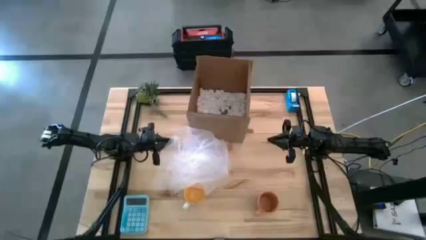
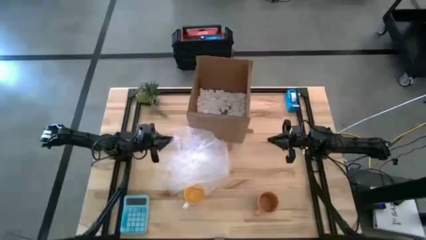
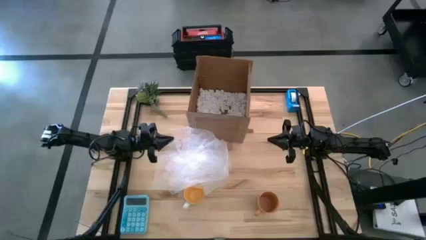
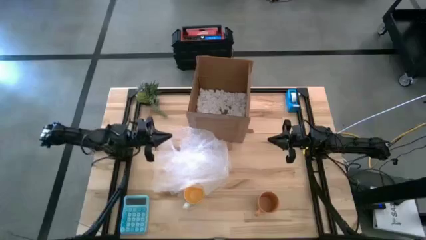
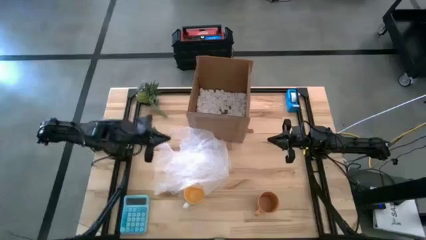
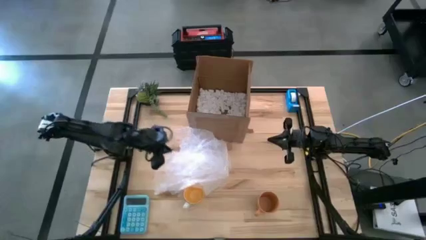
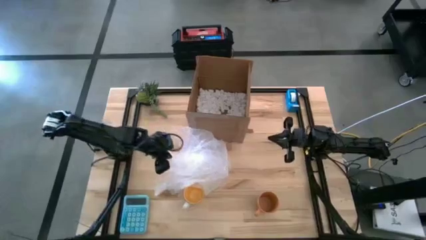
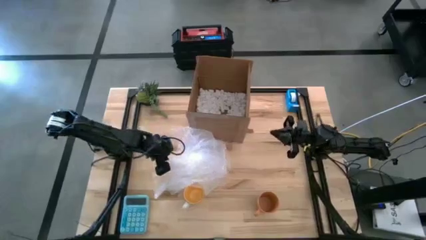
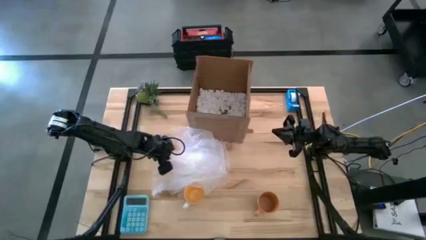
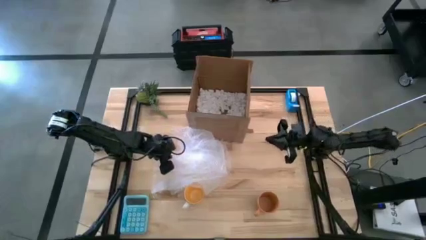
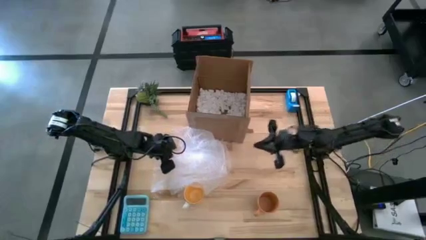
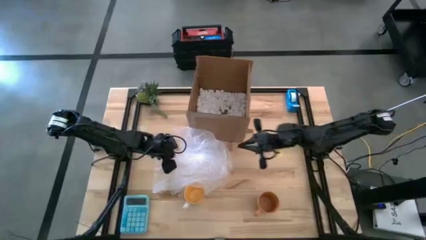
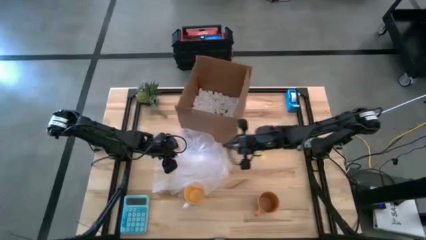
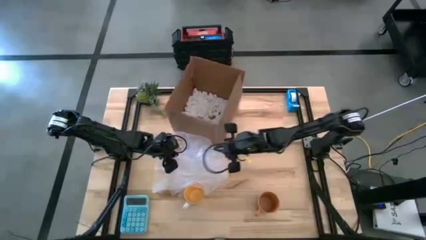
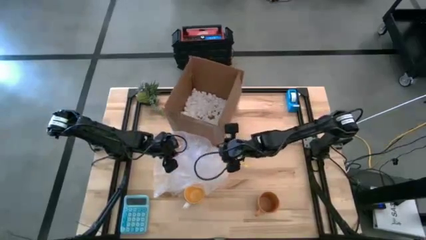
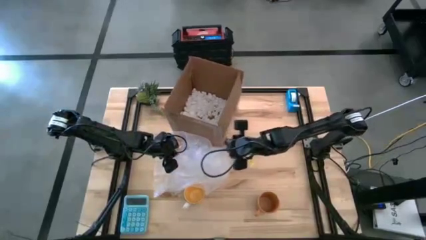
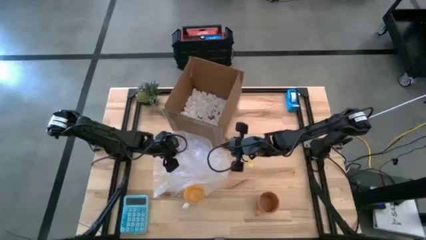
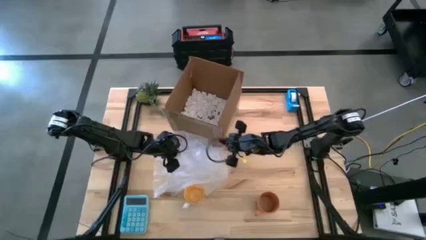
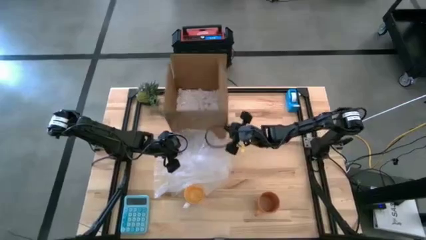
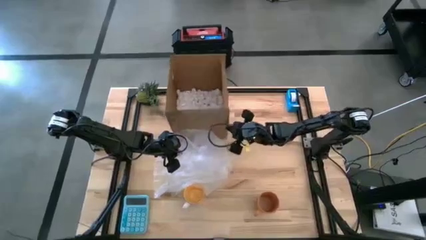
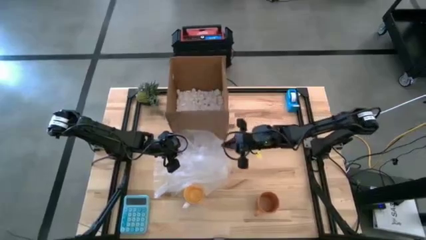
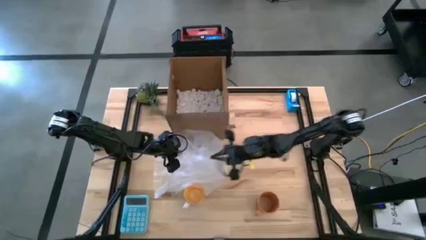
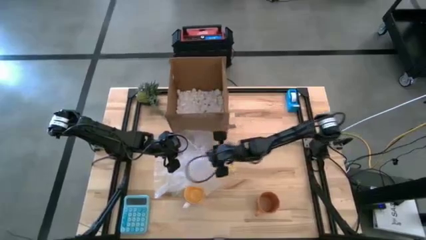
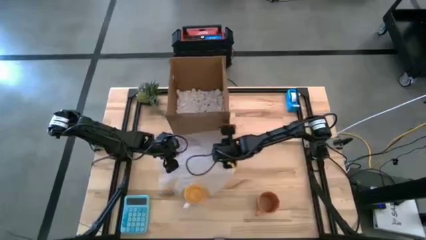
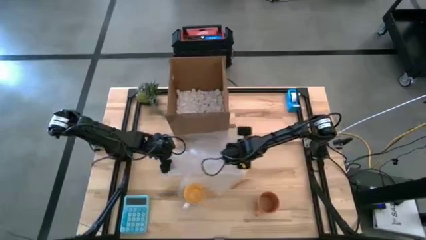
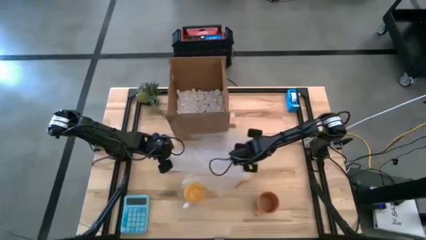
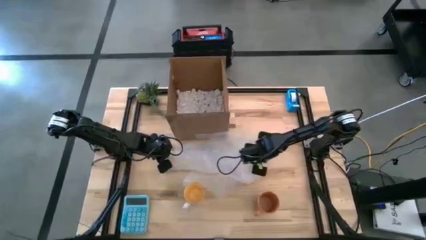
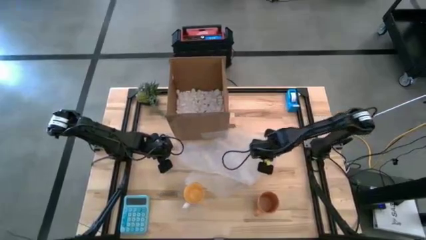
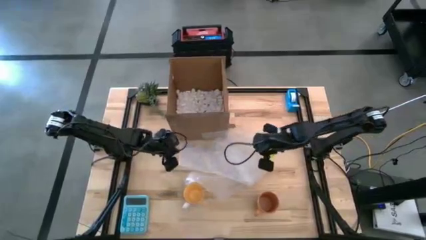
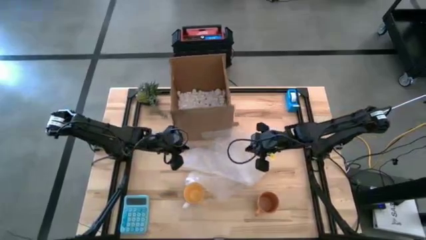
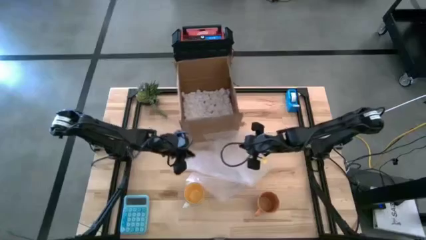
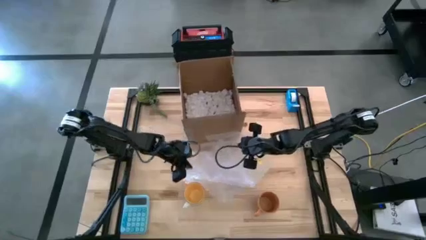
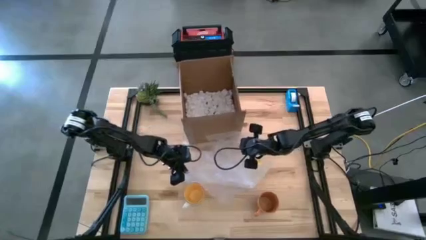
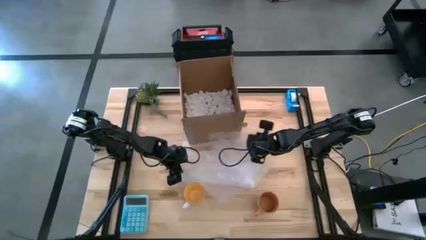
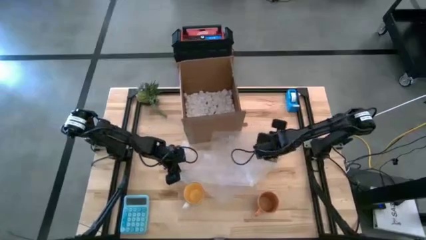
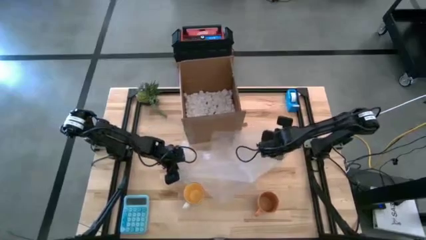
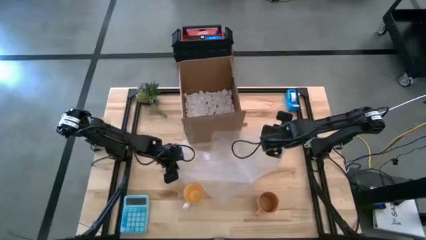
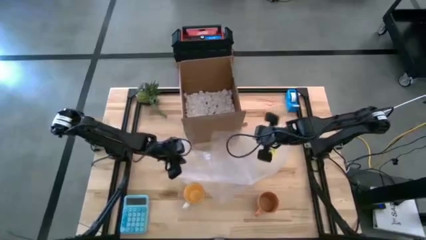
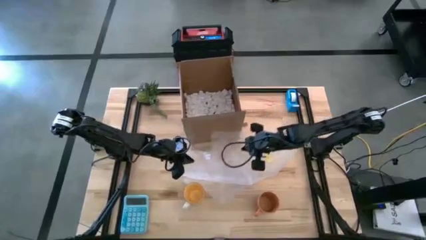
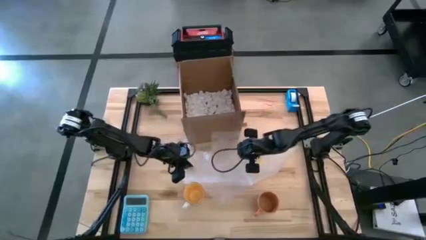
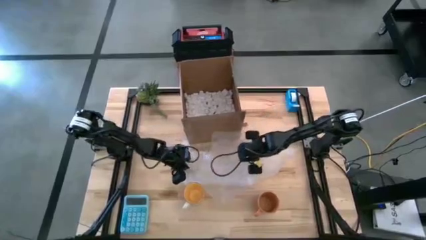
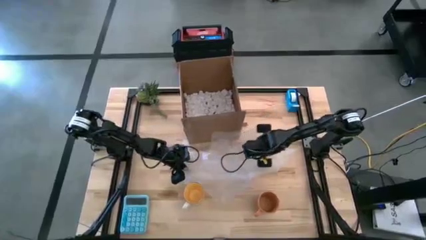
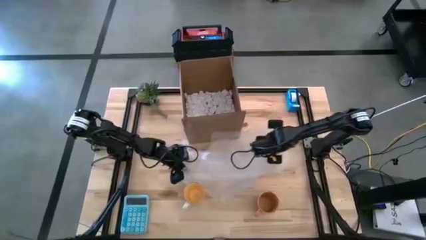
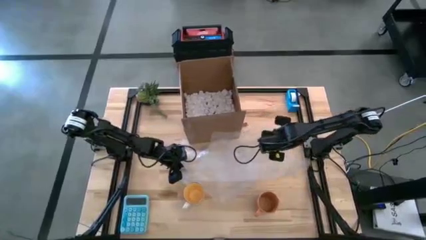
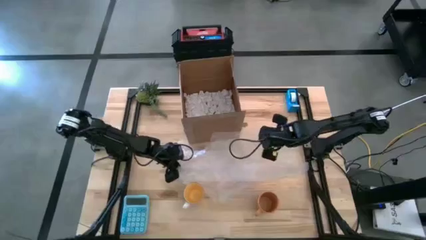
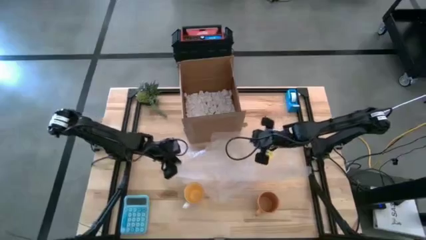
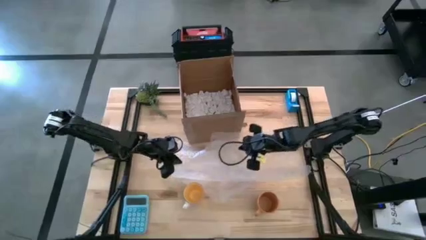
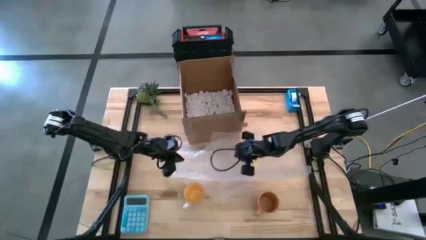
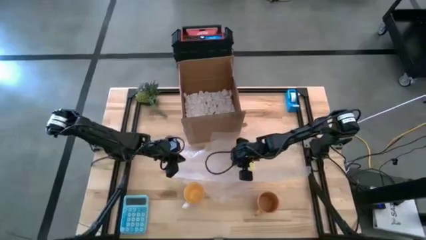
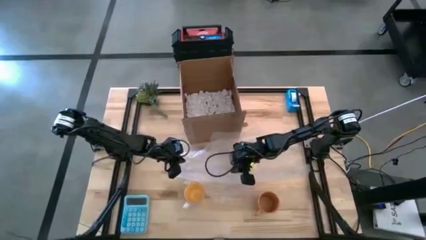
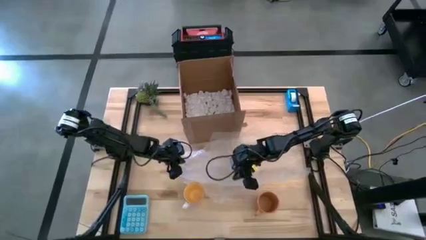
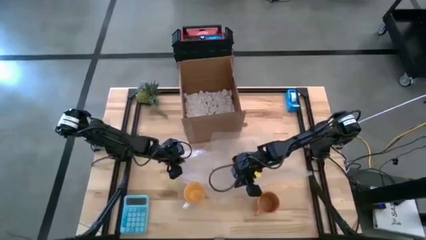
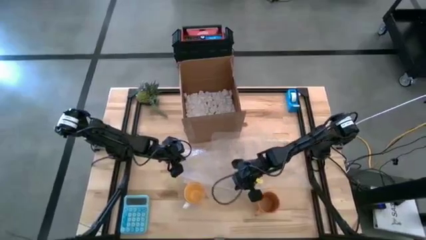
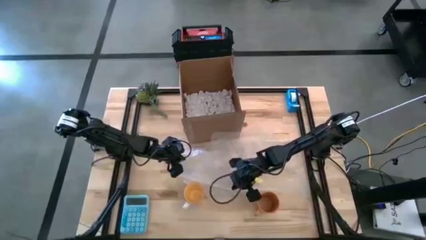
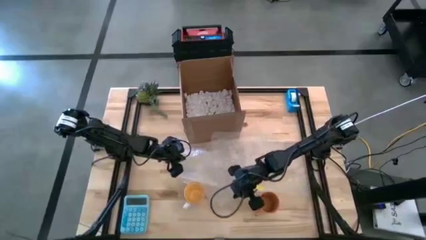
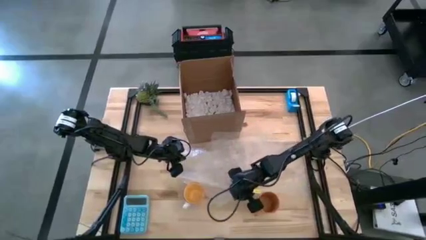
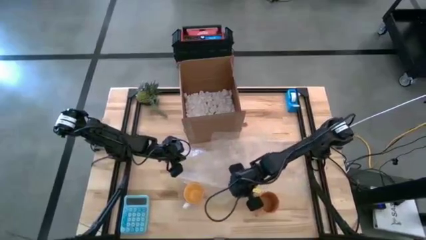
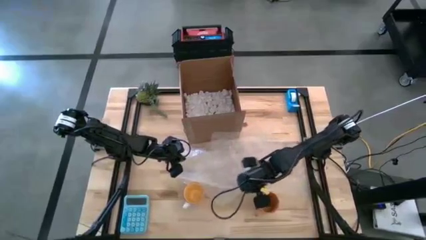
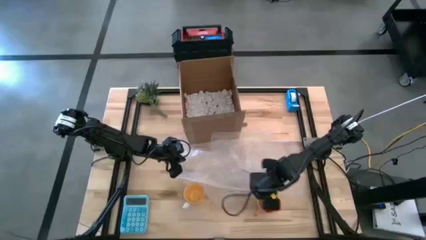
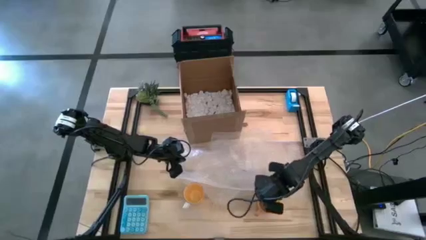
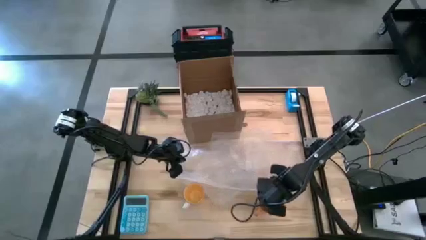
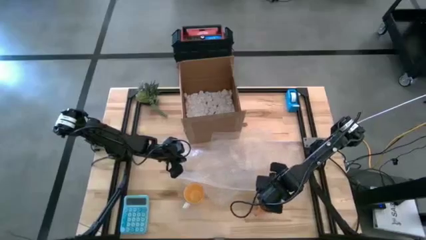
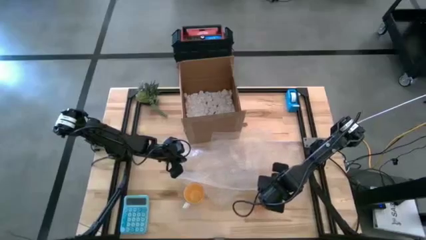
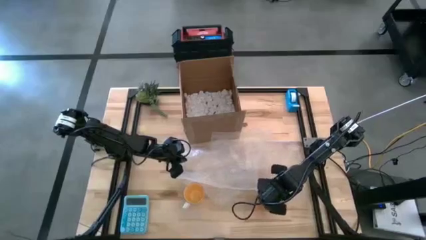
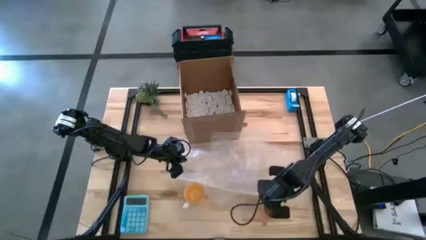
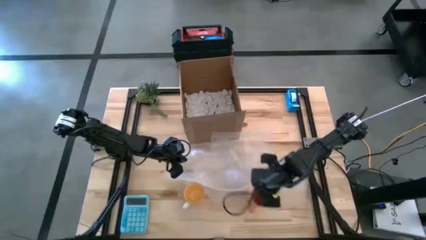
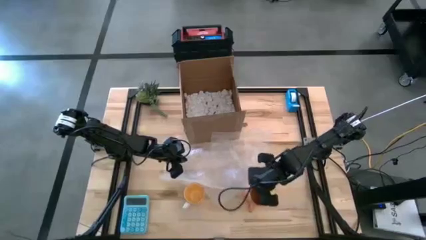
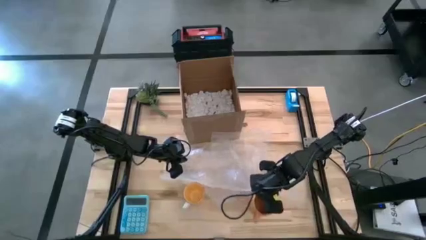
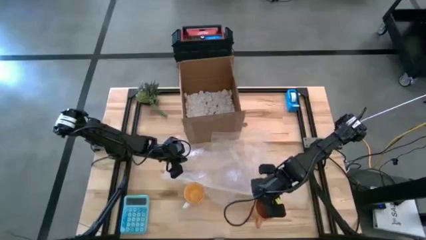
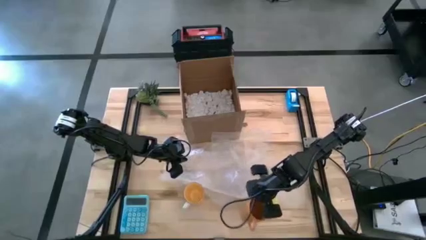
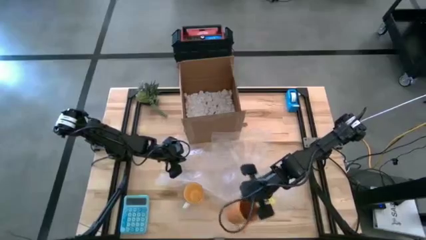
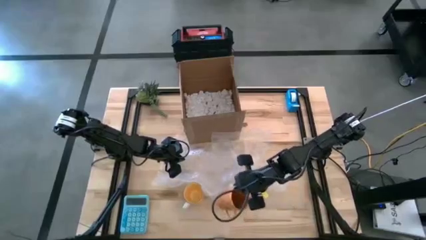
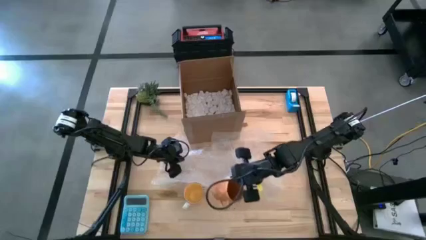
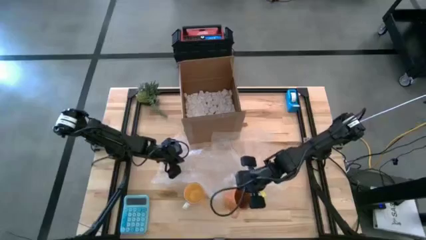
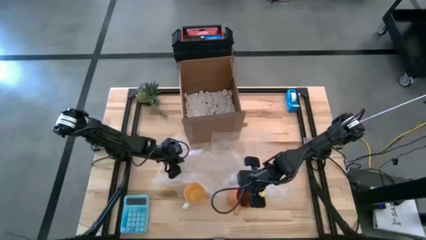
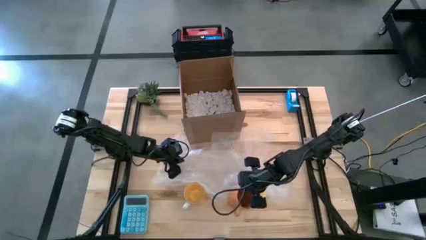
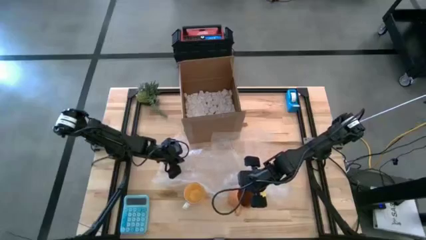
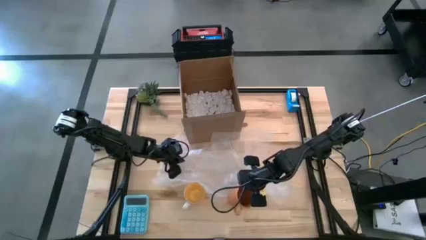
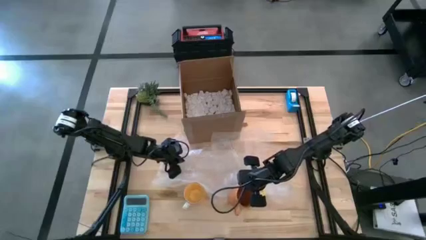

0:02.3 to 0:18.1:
Task: wrap mug
Wrap the orange mug with bubble wrap
